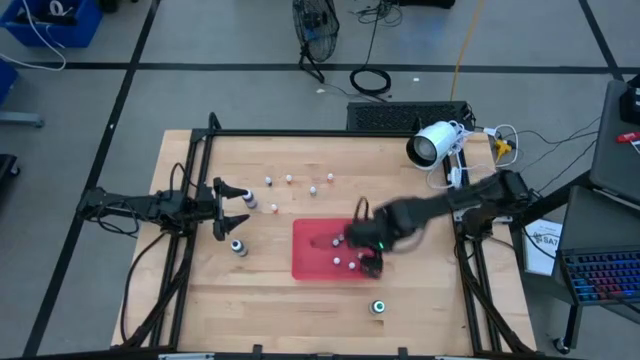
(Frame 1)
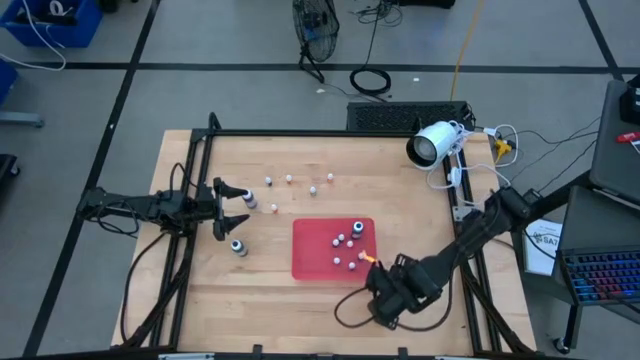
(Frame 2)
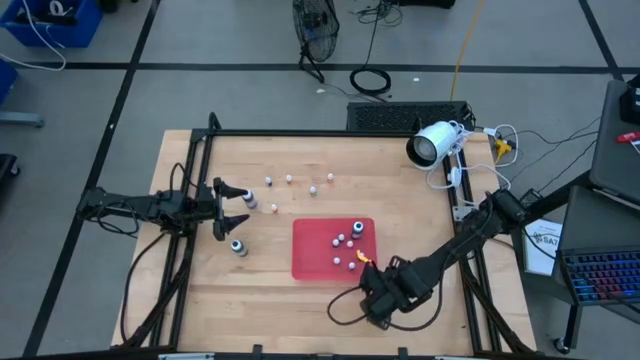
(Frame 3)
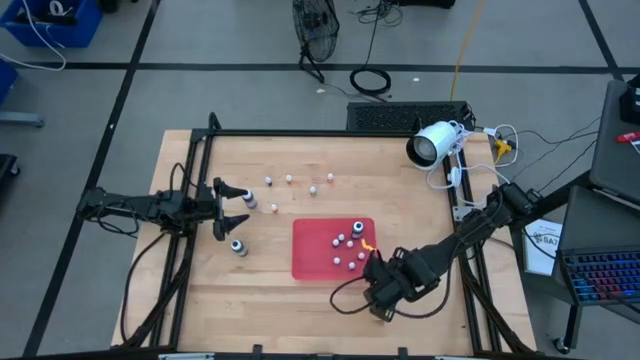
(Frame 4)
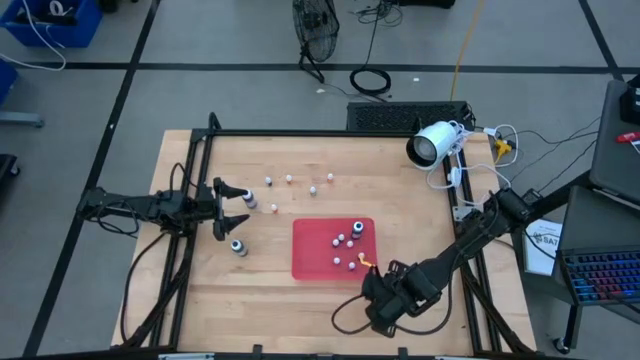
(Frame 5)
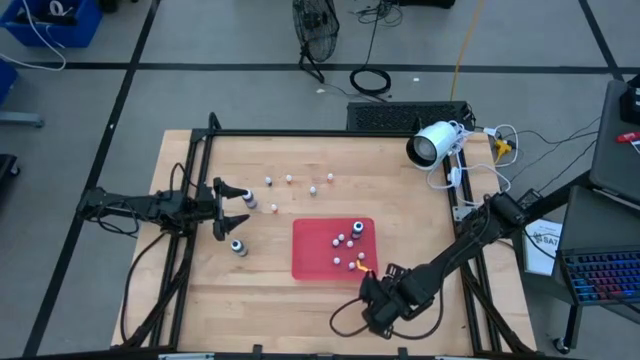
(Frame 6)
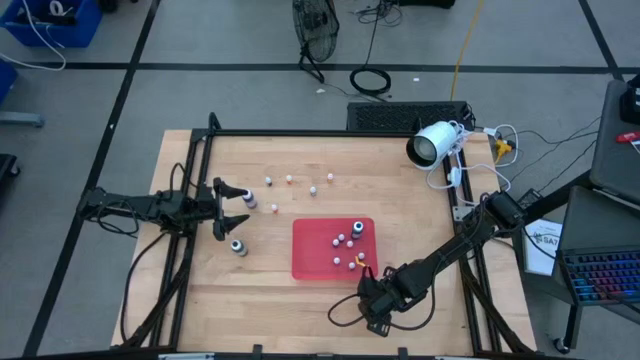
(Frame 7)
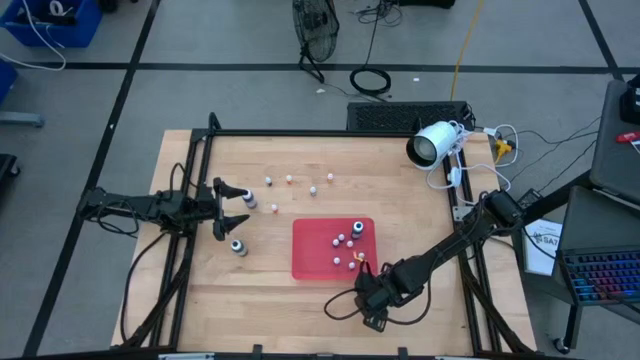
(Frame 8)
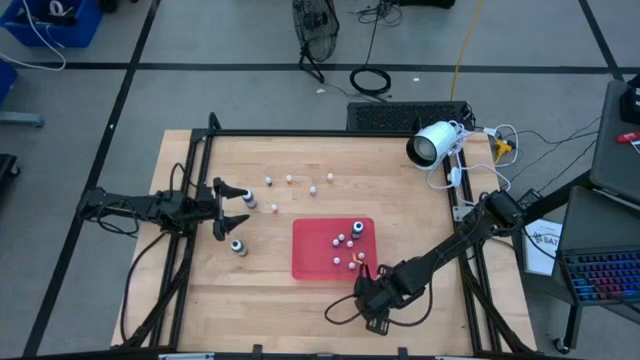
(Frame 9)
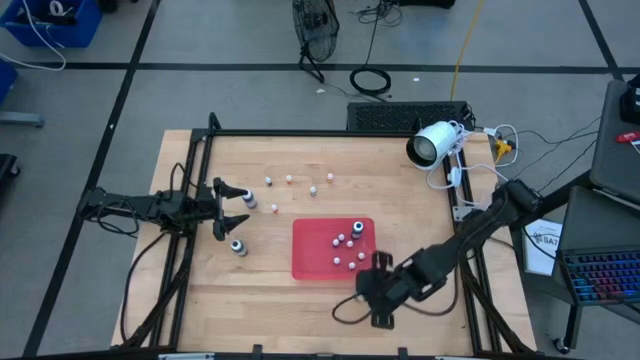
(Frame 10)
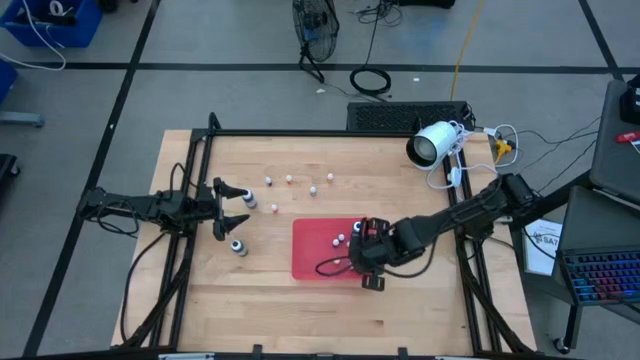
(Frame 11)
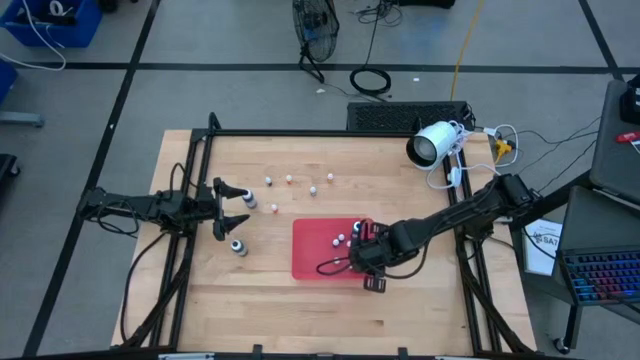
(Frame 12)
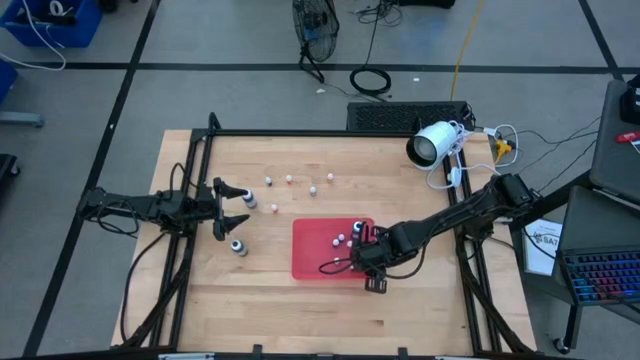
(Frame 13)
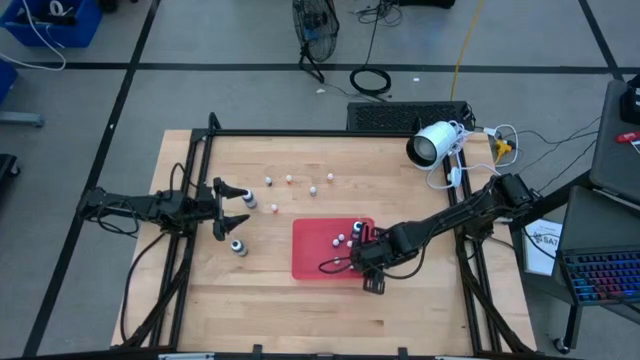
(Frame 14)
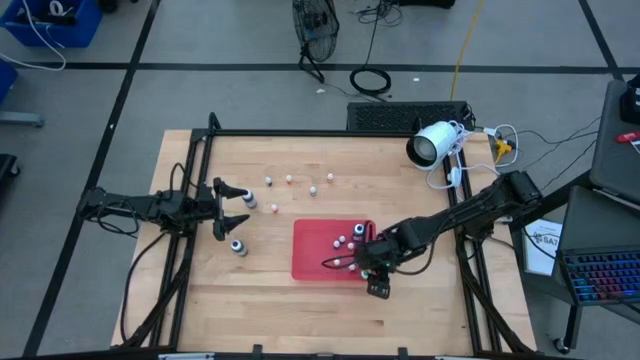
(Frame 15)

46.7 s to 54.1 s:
Task: Pick & Place food coloring
Put the large green food coloring bottle into the pink bin

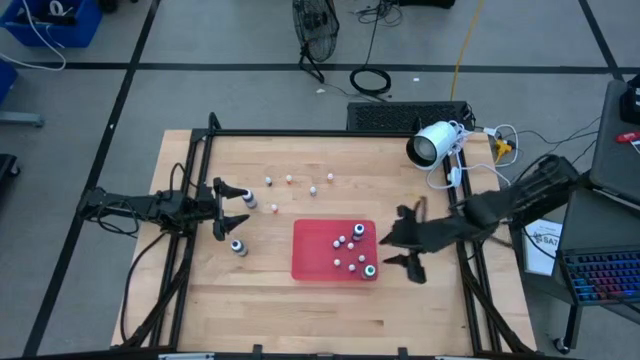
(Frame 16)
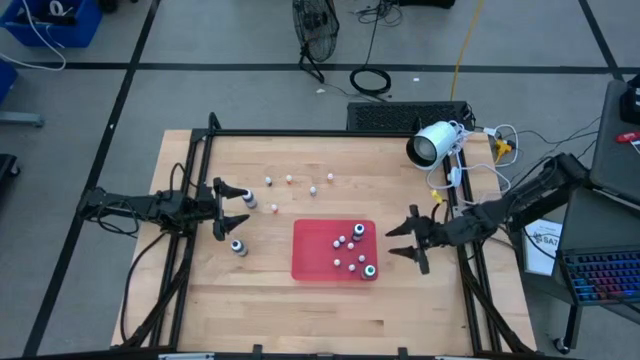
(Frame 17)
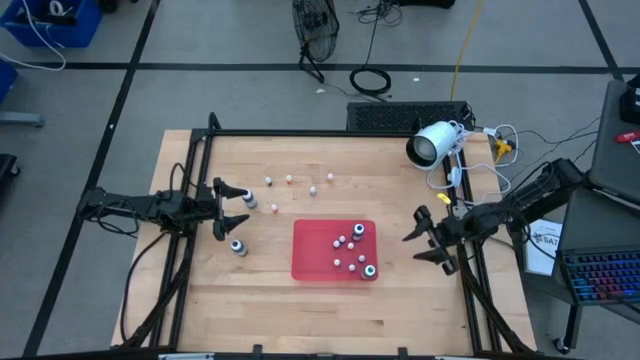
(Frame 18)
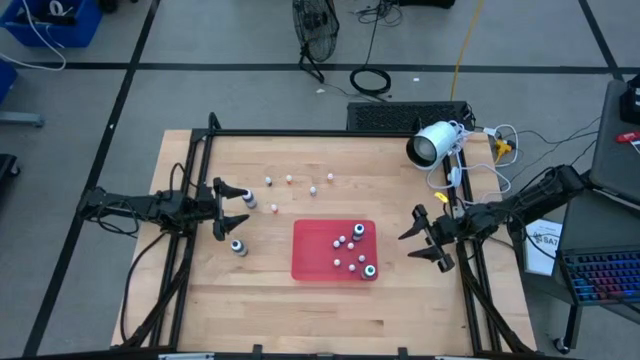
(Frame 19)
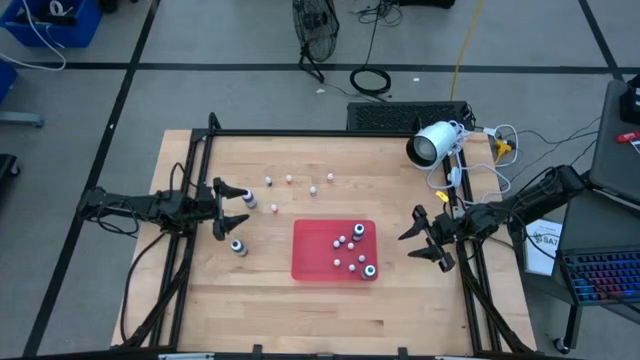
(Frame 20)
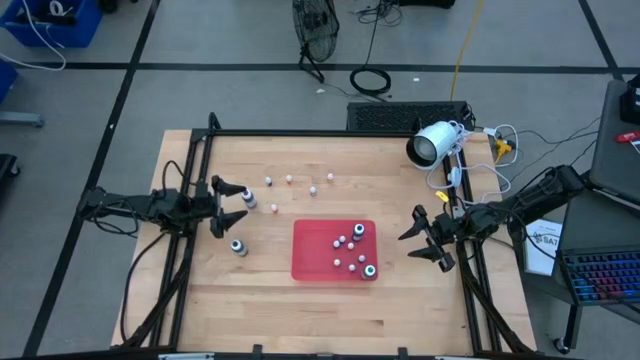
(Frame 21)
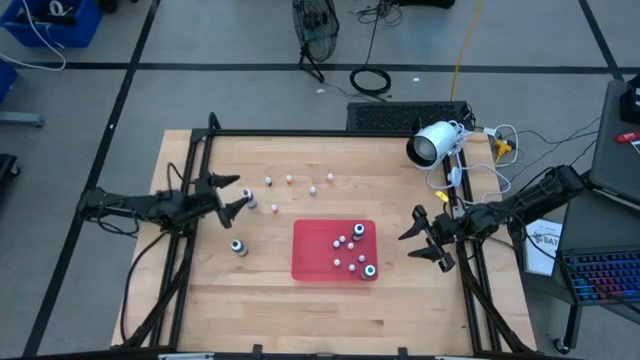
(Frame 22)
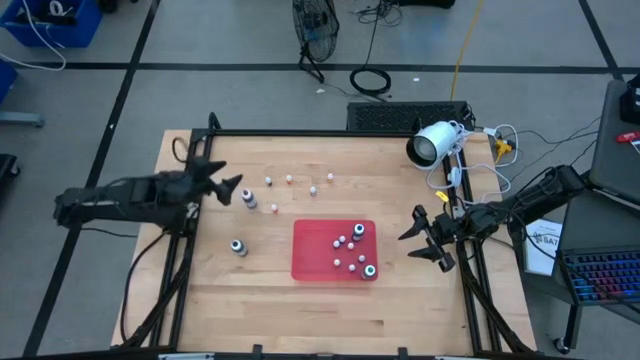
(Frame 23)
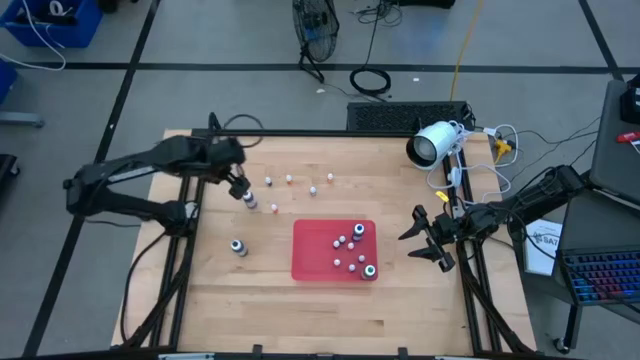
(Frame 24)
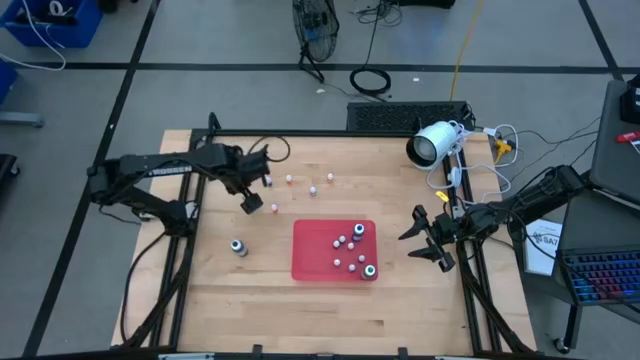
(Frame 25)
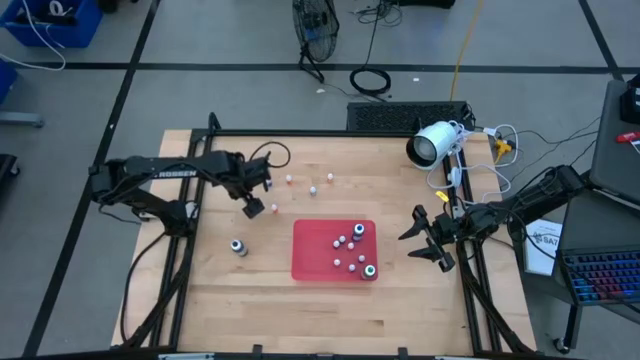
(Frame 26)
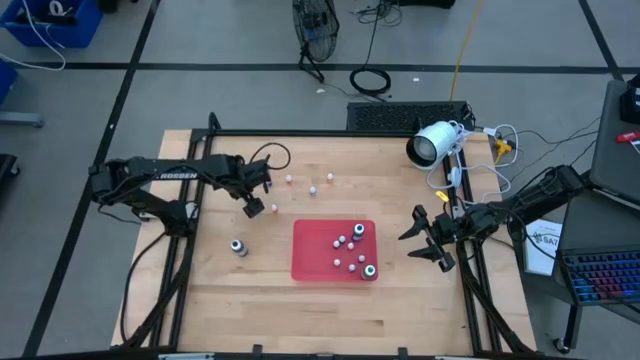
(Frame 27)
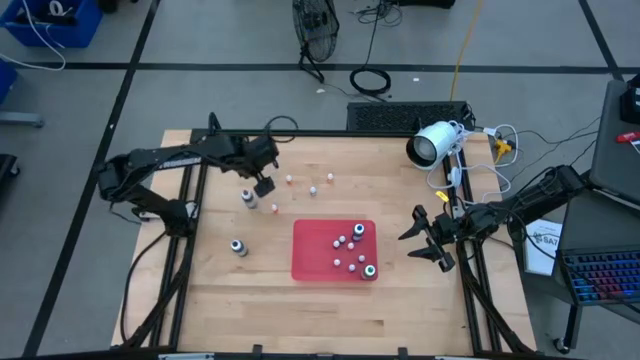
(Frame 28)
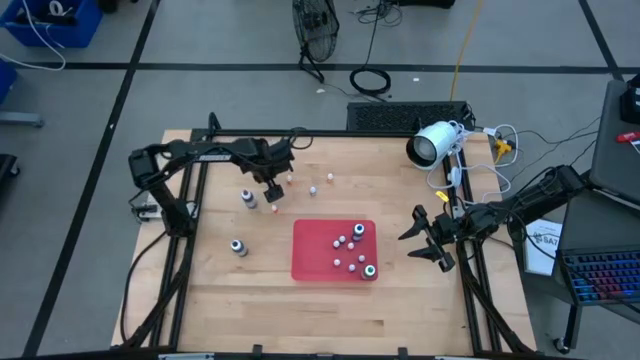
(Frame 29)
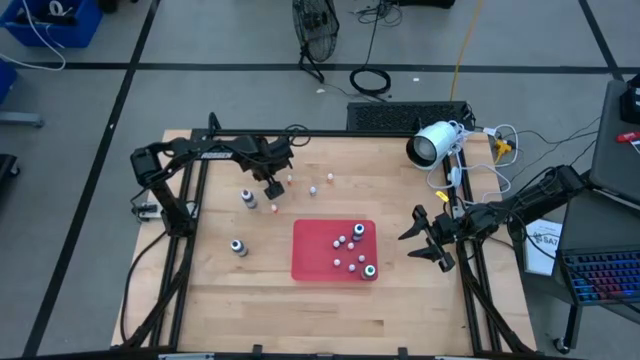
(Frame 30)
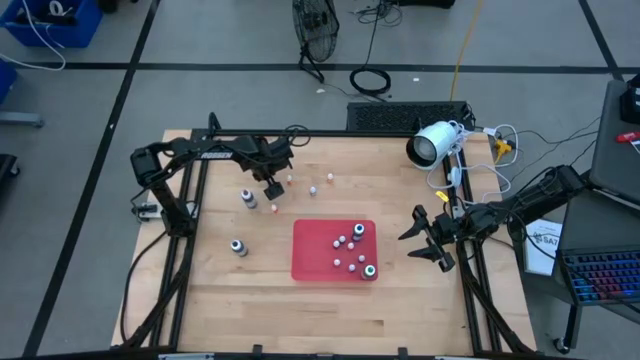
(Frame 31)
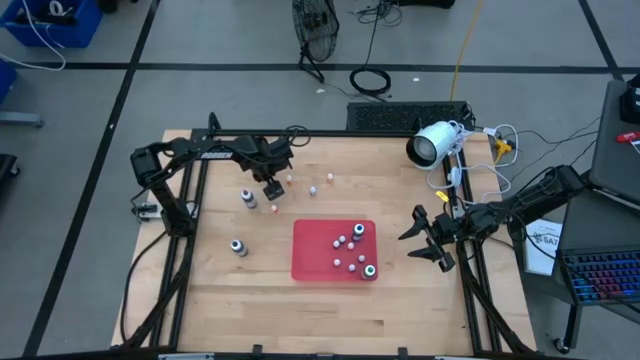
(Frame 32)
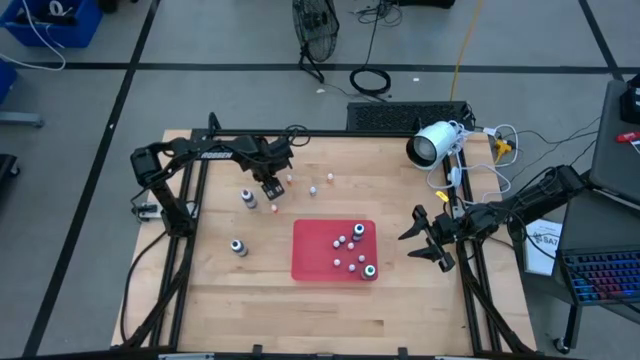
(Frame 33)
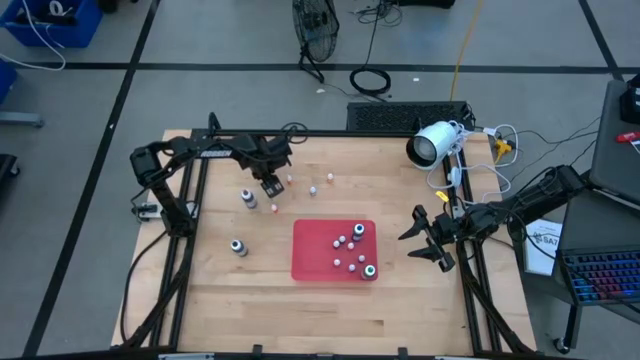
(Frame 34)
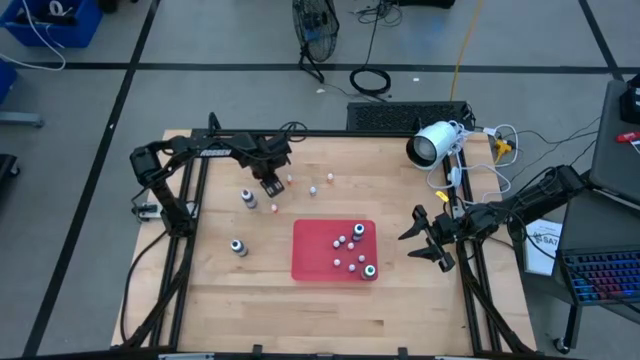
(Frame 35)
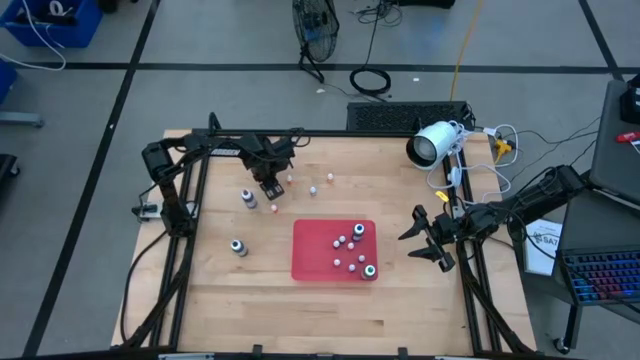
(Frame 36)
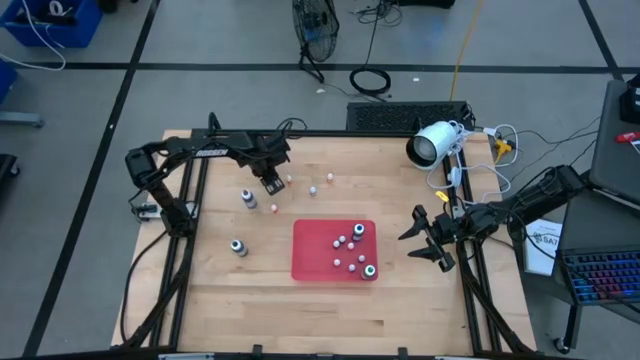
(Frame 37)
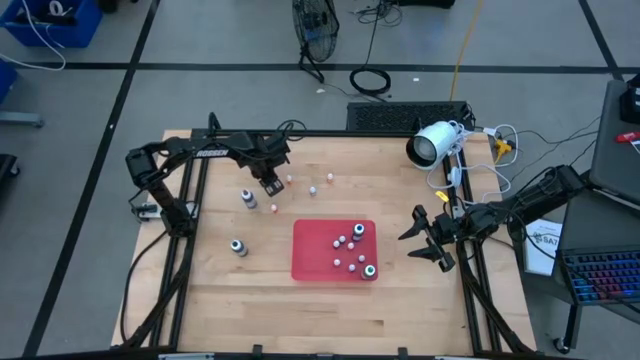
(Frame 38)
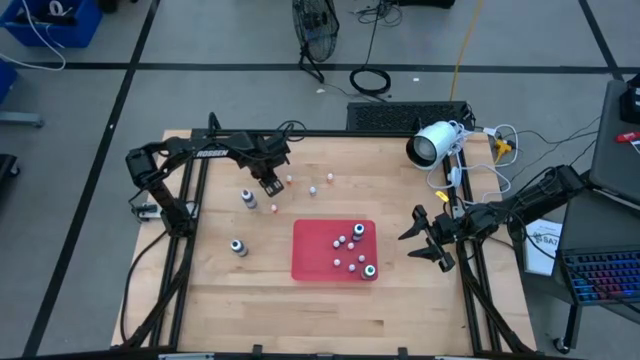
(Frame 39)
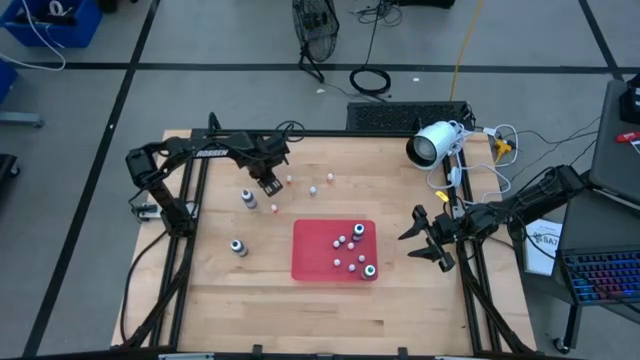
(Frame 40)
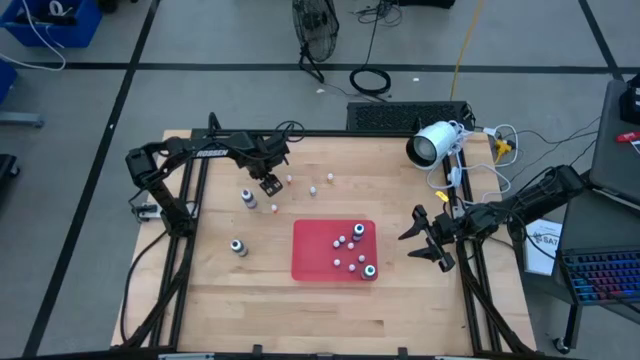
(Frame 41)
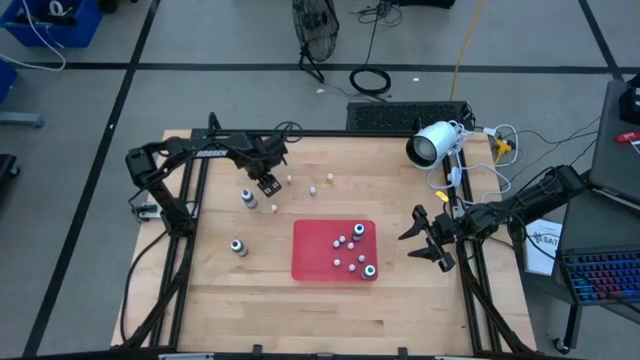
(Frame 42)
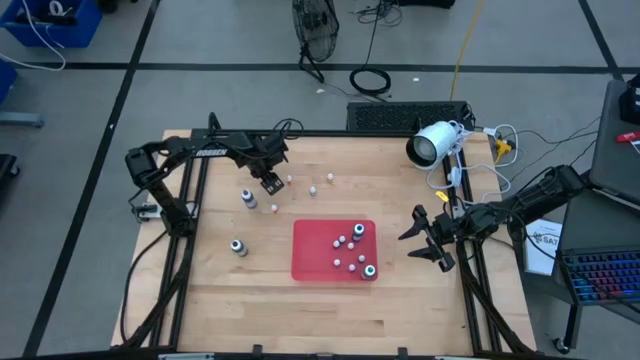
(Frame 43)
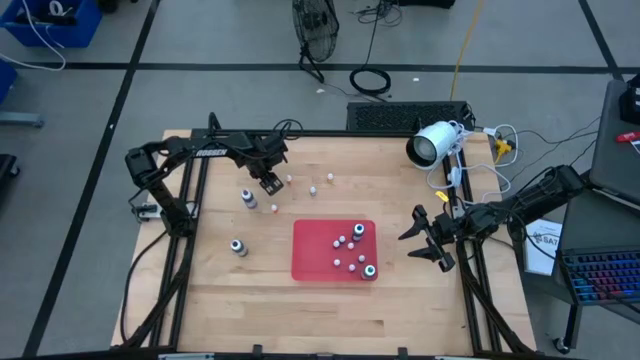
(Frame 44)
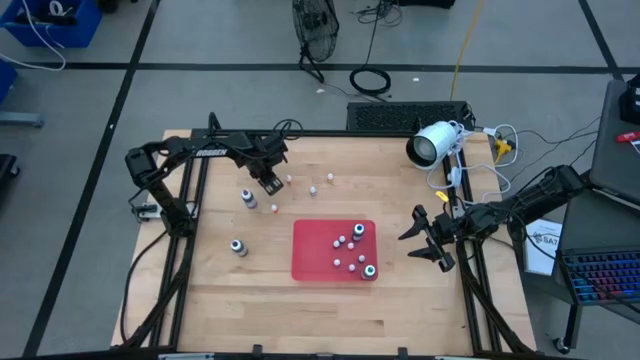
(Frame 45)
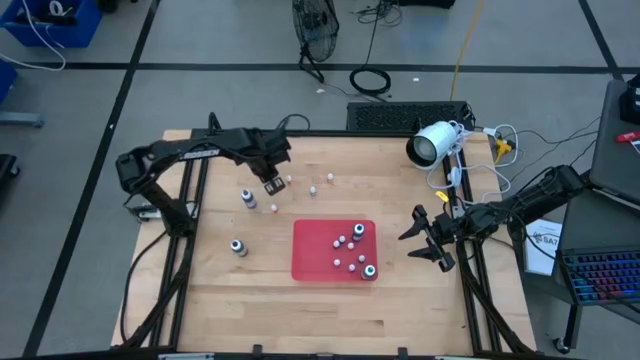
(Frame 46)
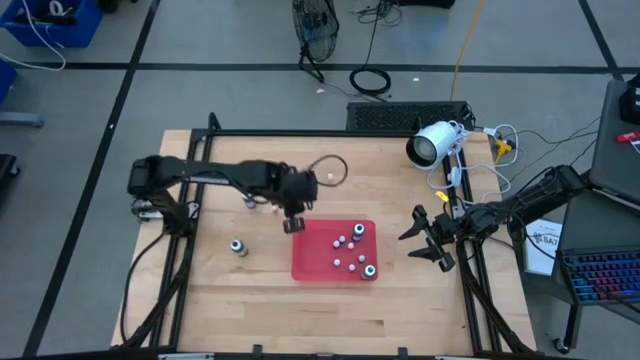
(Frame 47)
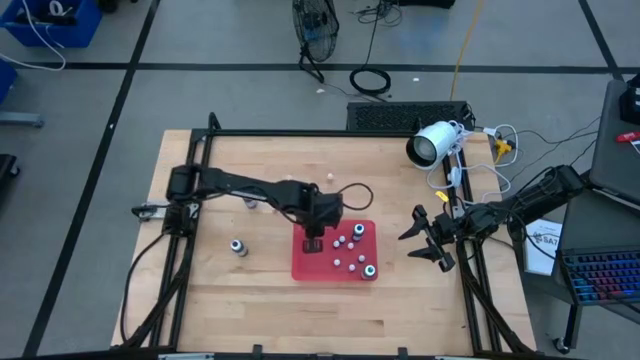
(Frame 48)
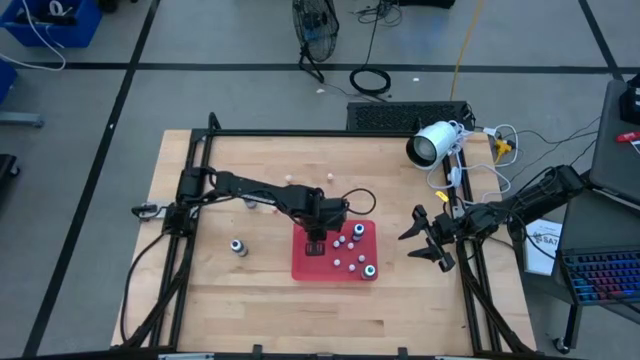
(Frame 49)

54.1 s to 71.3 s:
Put the small black food coloring bottle into the pink bin
